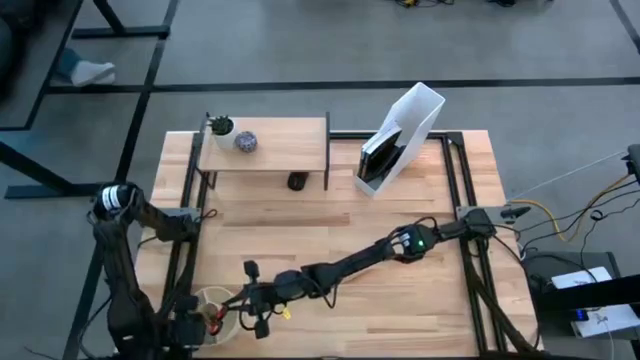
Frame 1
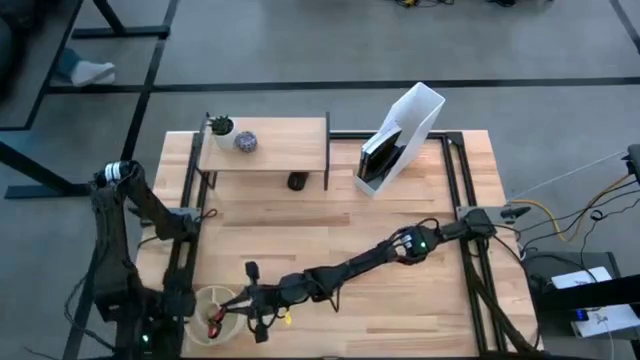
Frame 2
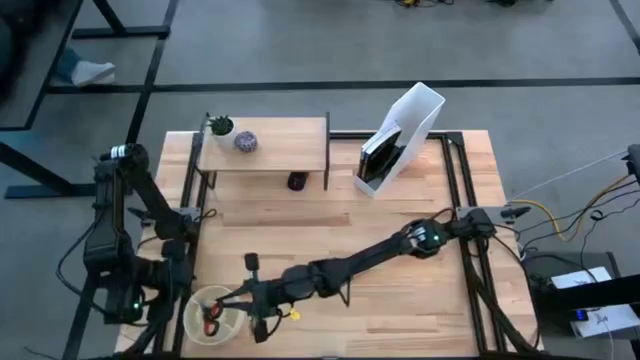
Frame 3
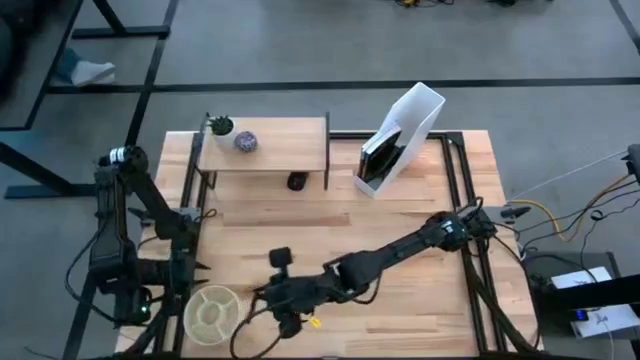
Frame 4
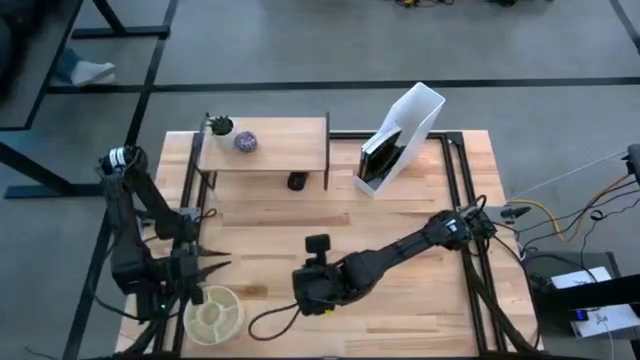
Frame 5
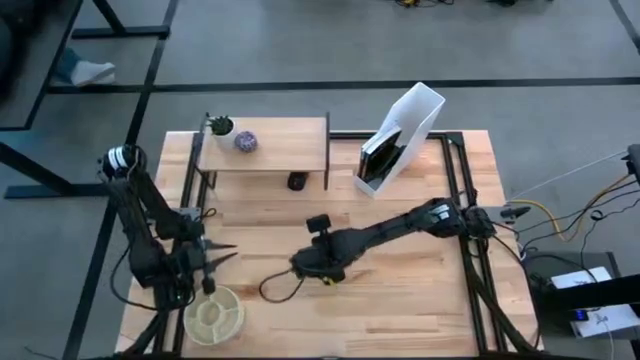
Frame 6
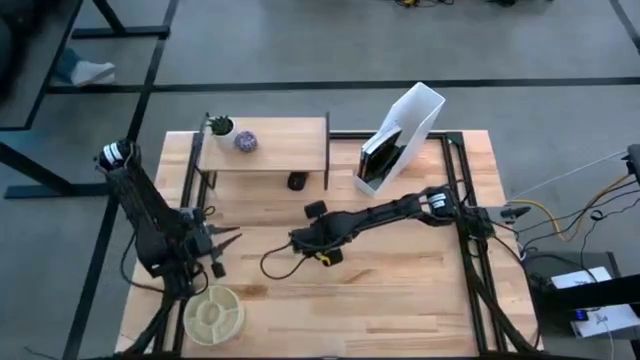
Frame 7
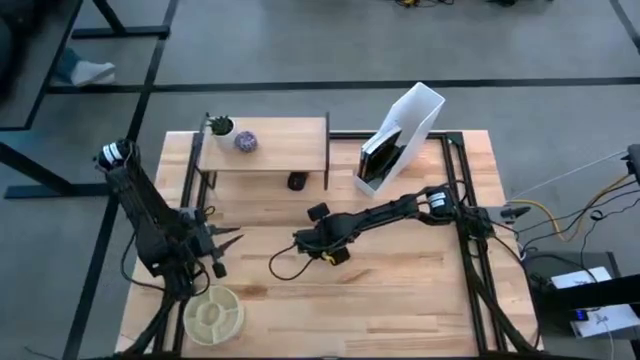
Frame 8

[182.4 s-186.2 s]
Task: Stock shelves
Remove the black scissor from the white pen organizer

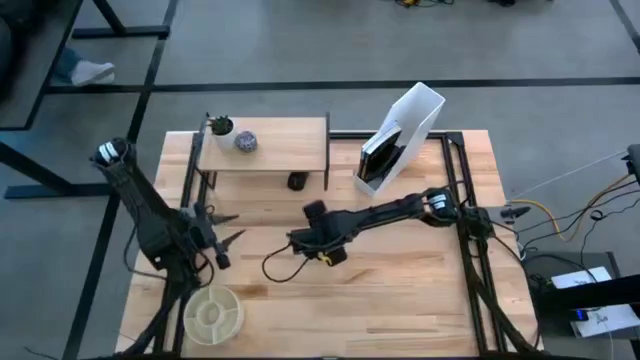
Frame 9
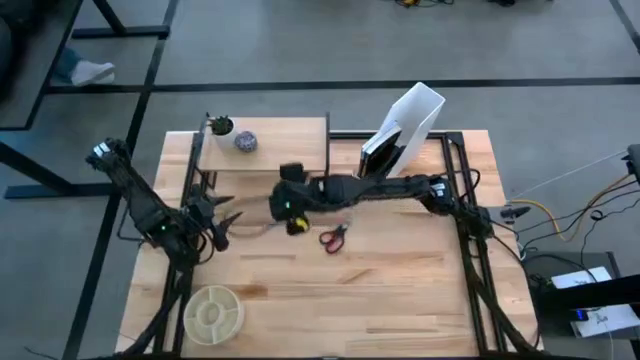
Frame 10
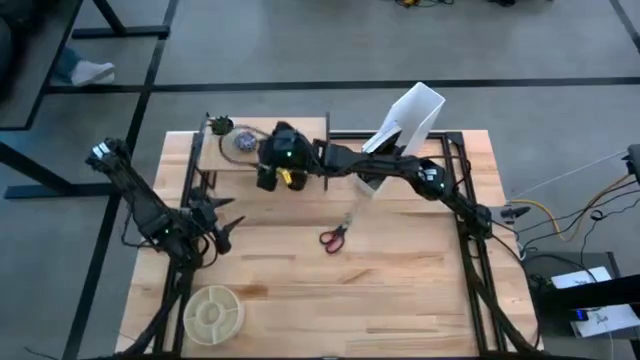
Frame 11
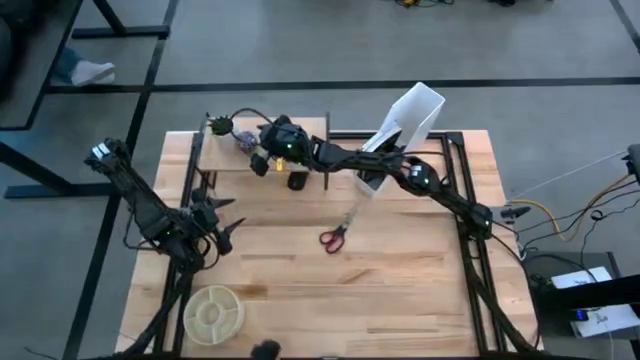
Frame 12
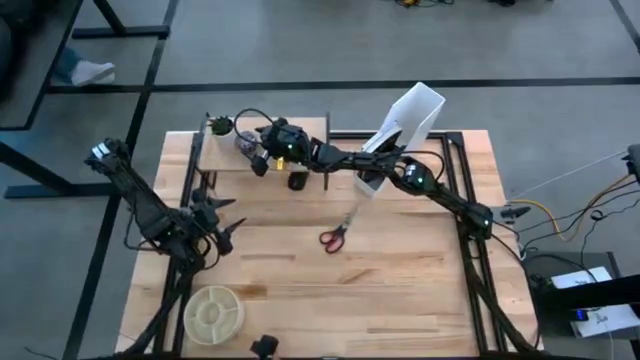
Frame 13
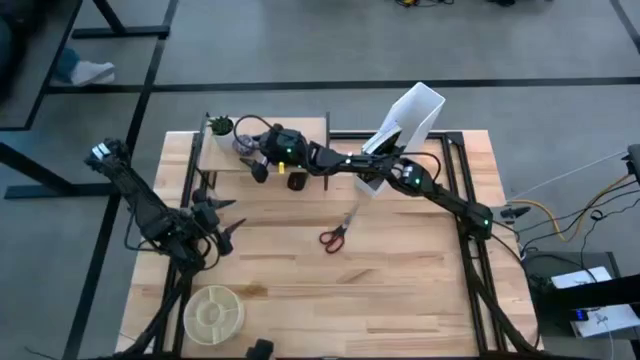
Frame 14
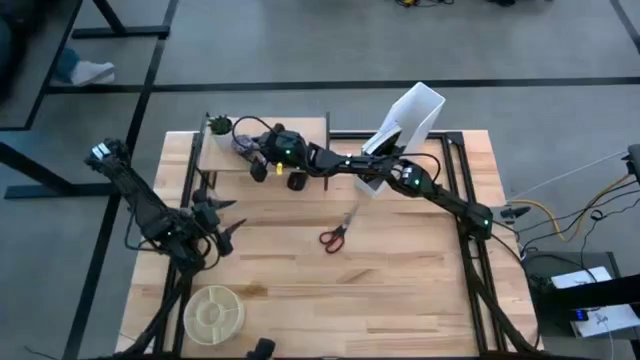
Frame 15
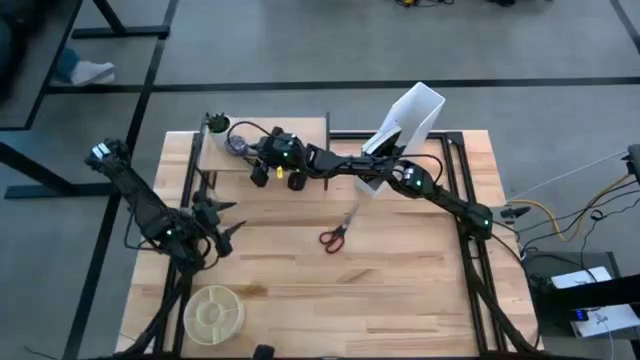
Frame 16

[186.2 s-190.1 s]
Remove the red scented candle from the shelf

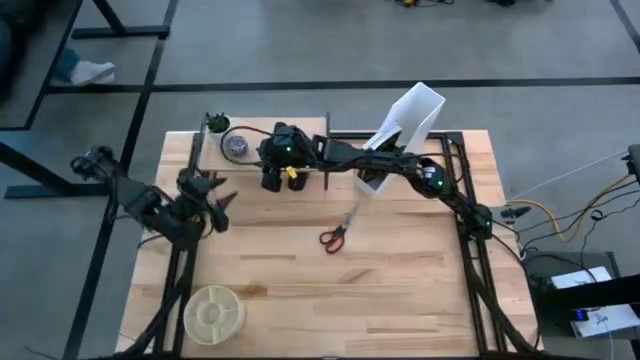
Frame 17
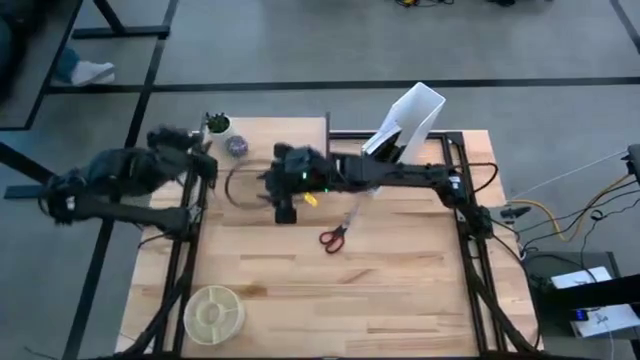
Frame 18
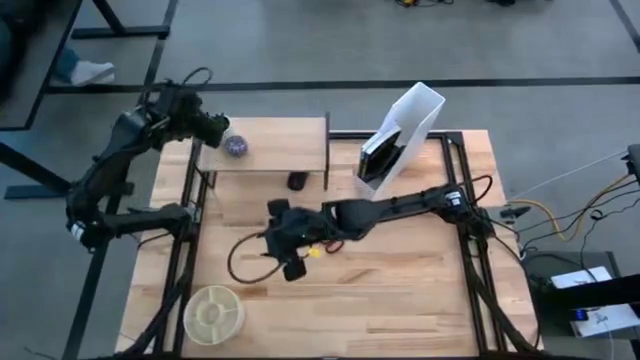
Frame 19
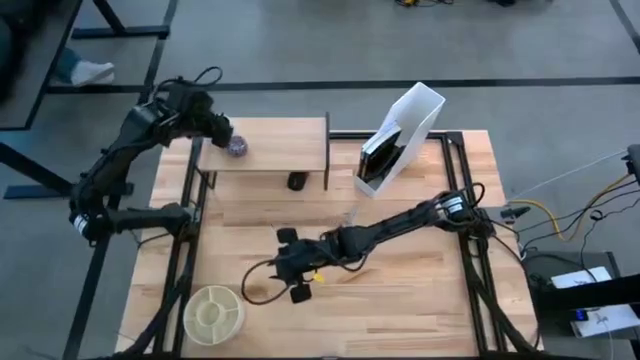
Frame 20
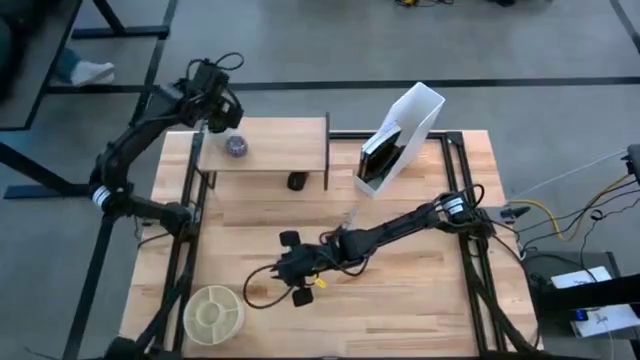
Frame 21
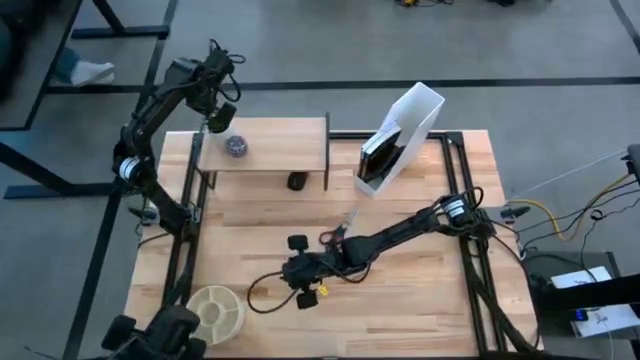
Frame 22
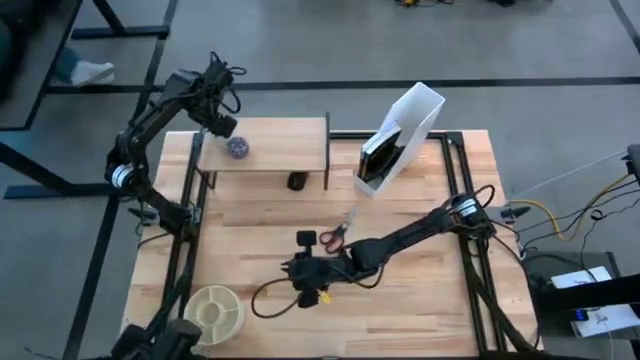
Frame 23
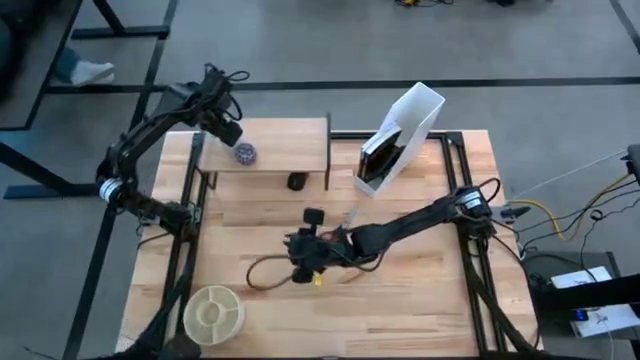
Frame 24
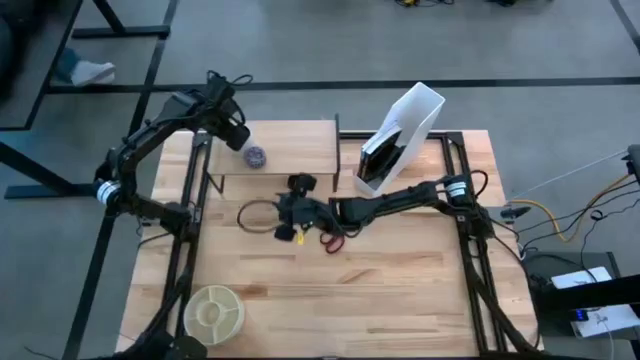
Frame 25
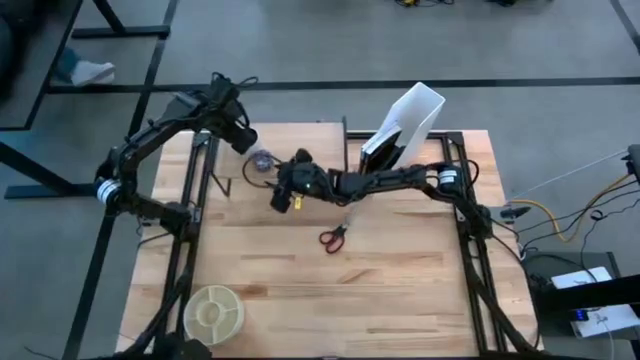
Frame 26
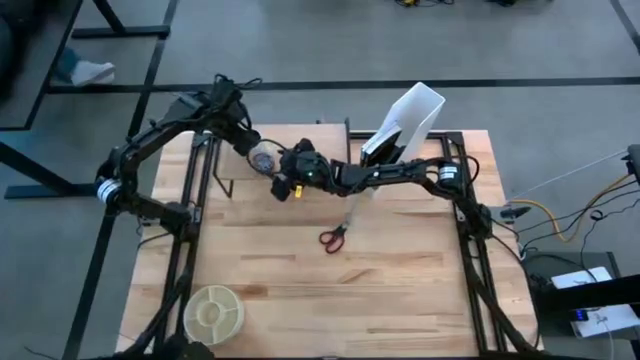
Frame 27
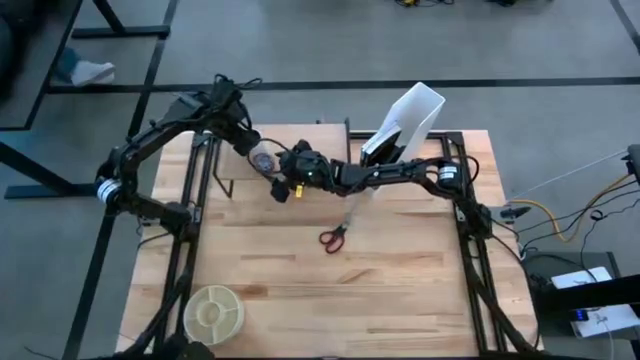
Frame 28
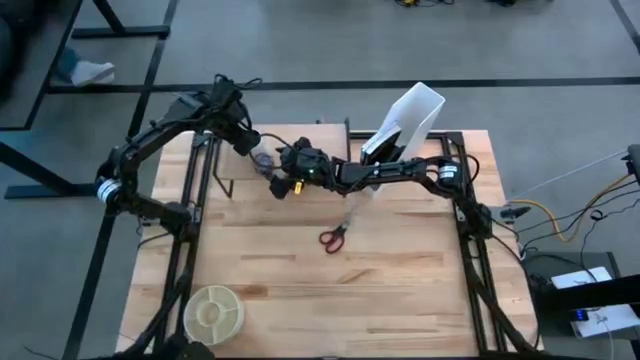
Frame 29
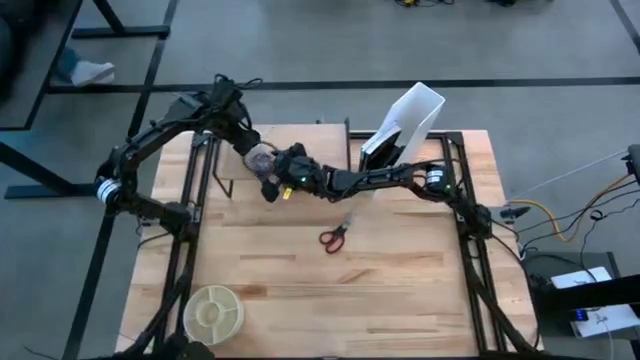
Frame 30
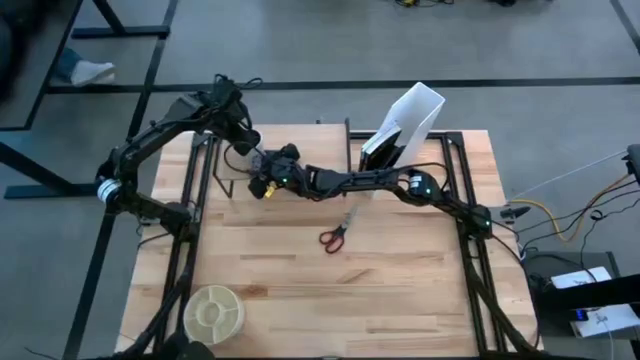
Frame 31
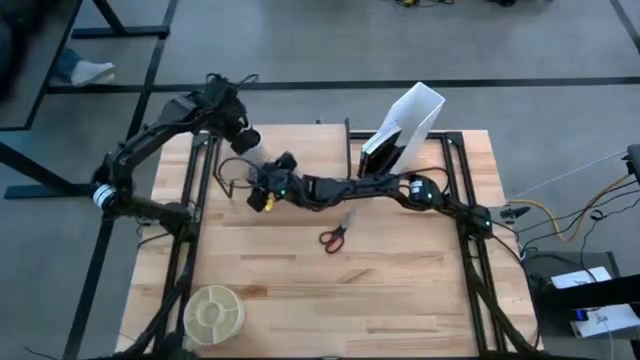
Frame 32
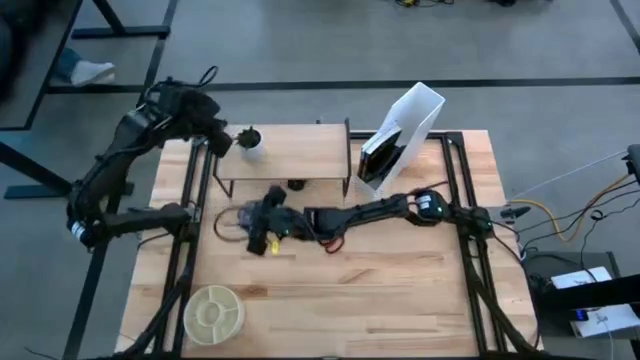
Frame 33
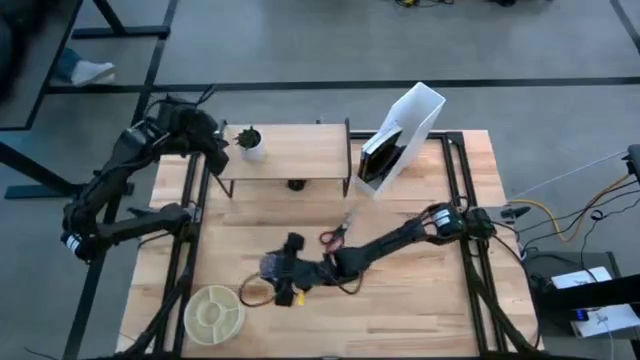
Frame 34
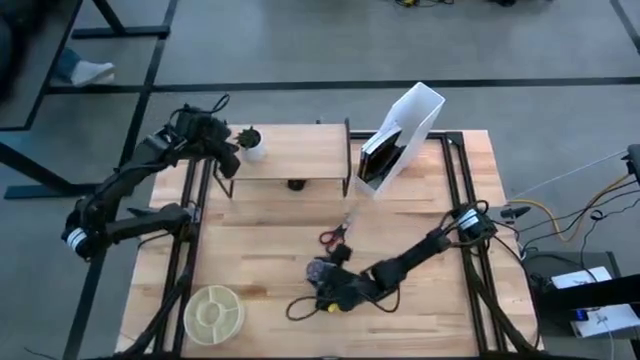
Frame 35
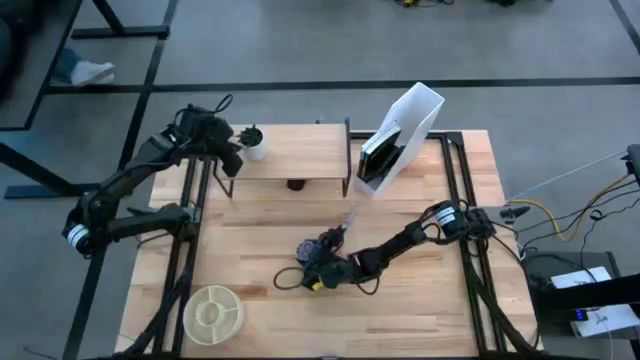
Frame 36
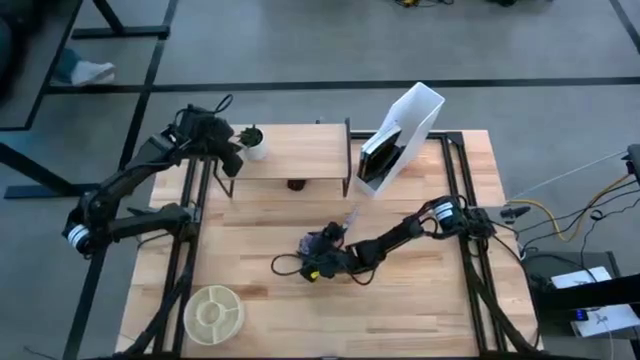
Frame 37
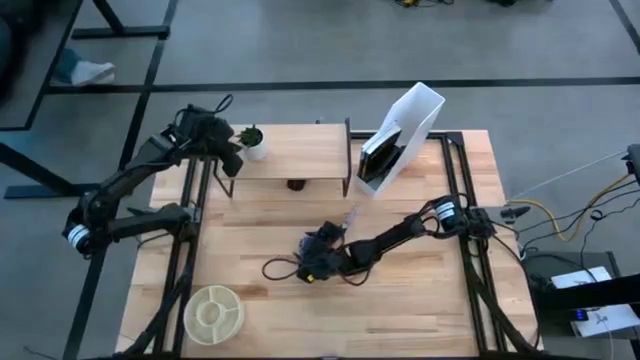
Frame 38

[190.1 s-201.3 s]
Remove the red scented candle from the shelf

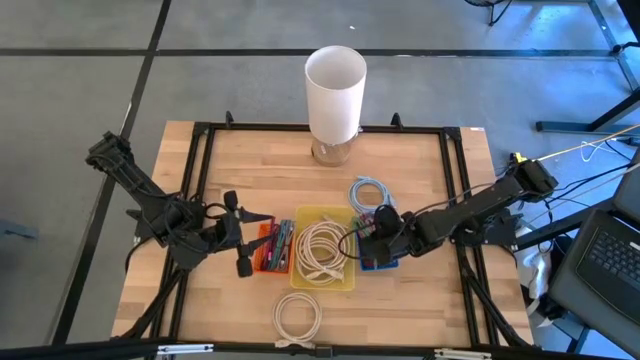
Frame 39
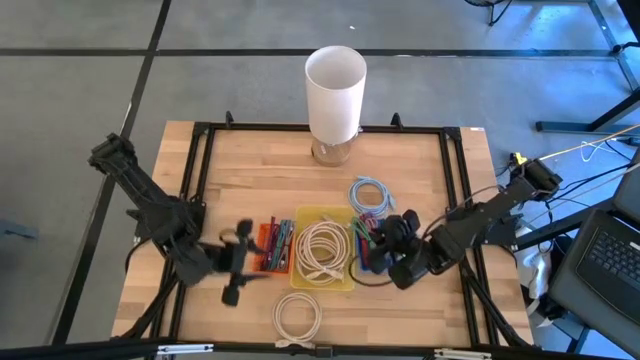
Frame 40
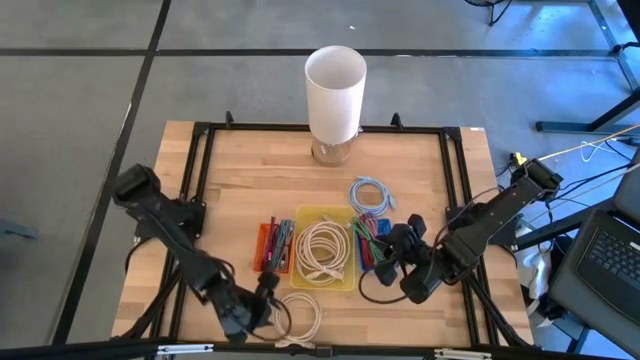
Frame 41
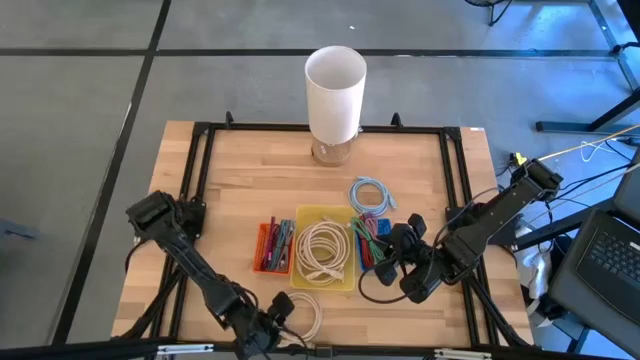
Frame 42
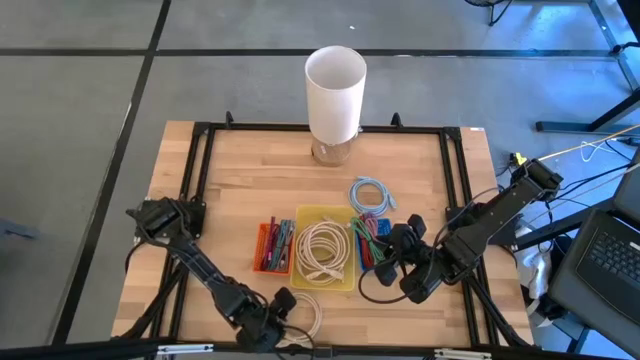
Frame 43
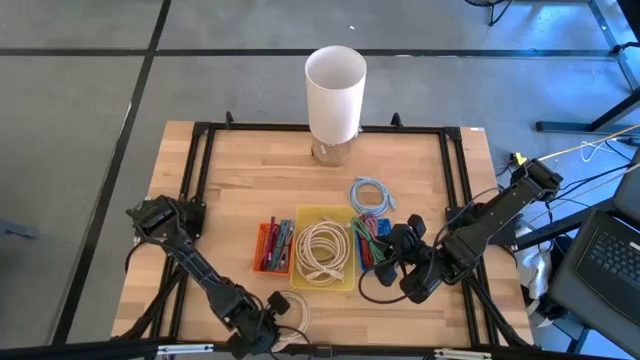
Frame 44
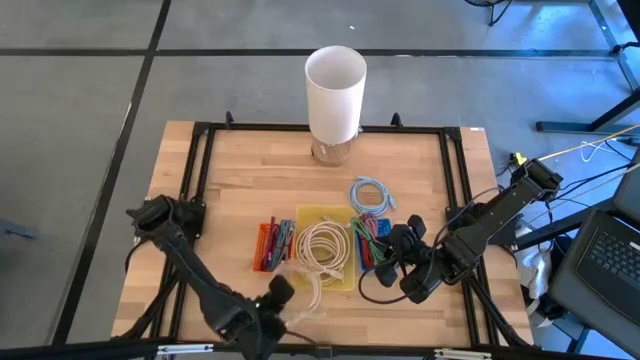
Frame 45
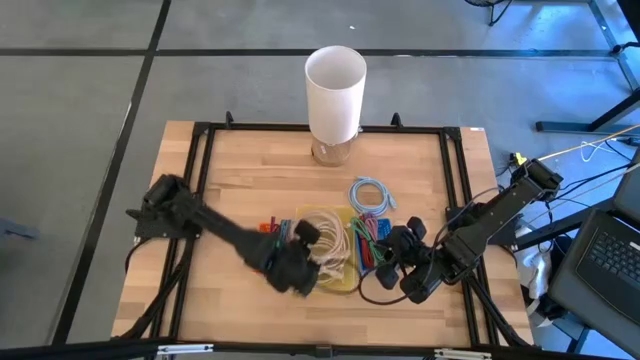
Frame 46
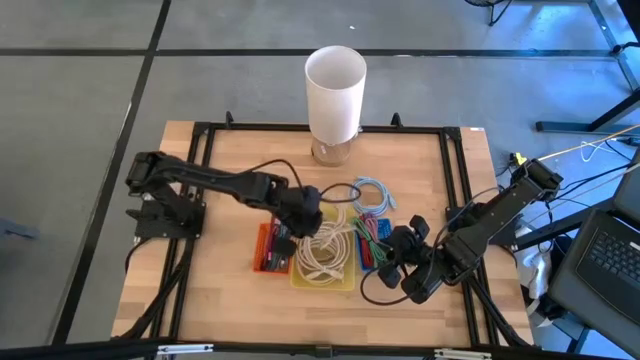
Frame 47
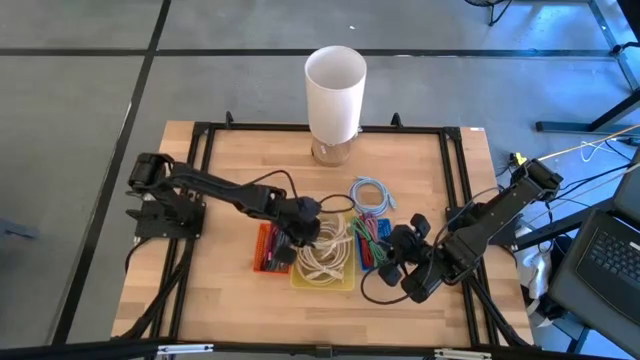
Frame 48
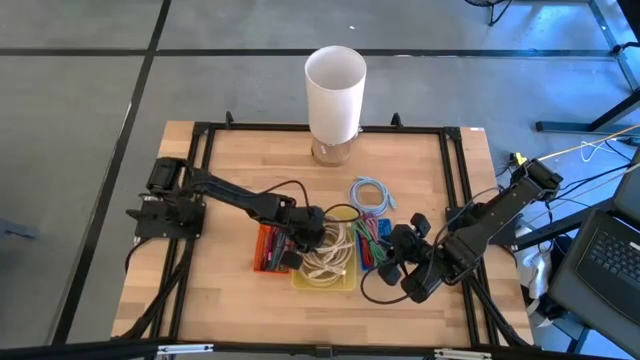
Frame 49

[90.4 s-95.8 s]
Task: Pick & Place USB Port
Put the brown HDMI cable into the yellow bin
